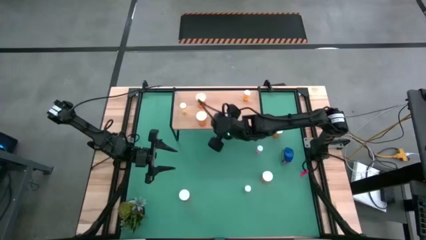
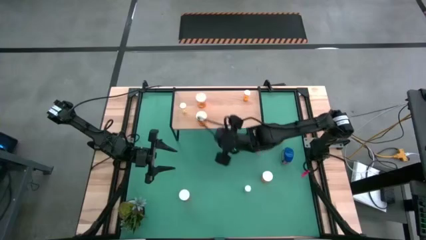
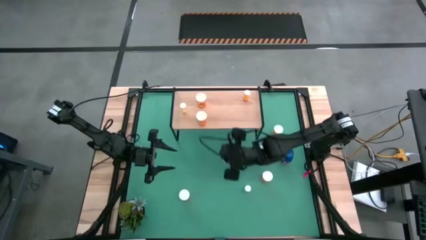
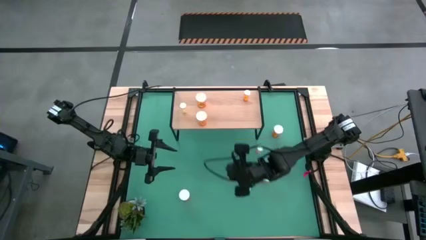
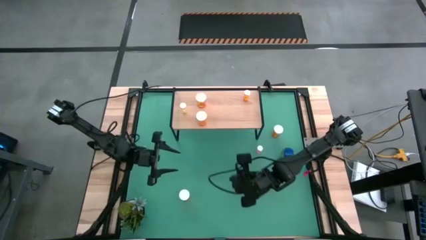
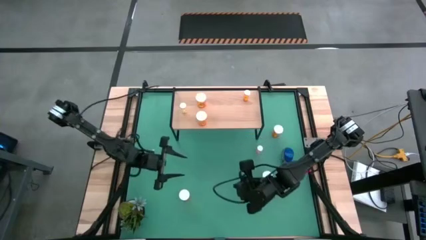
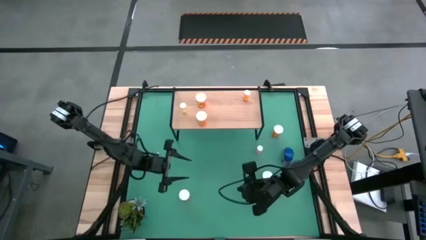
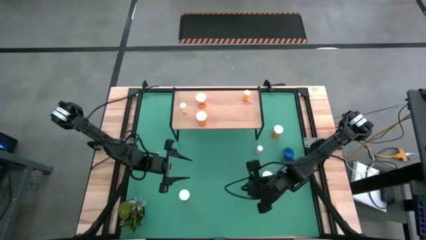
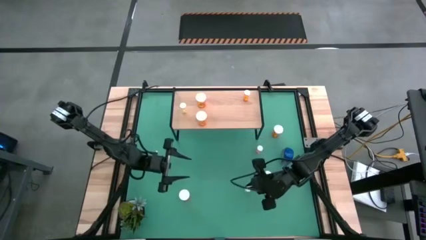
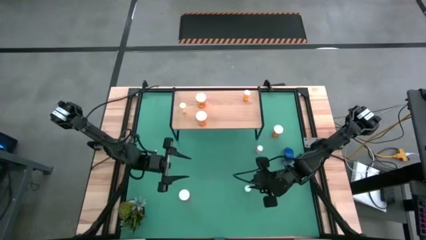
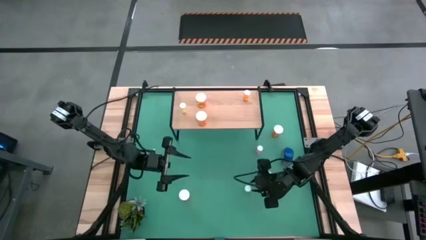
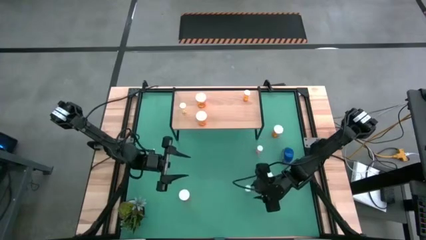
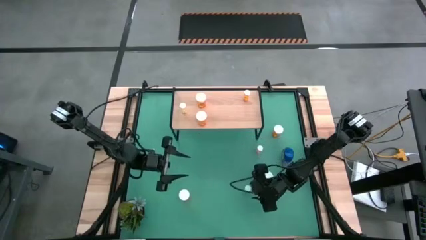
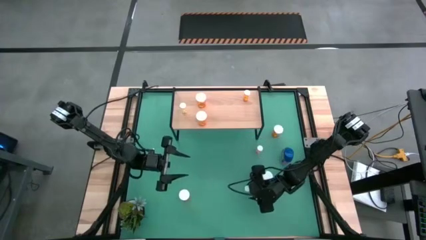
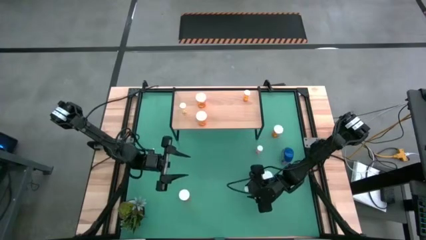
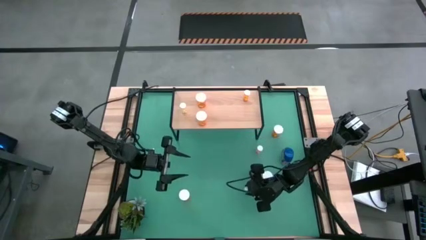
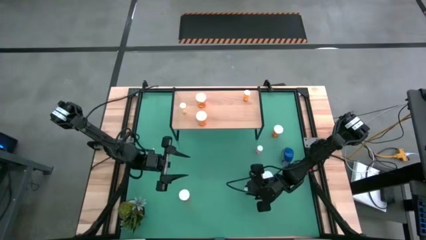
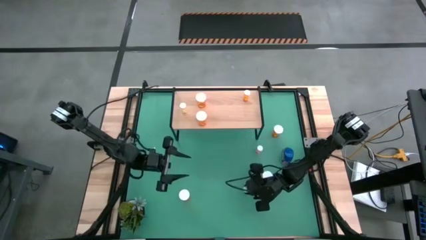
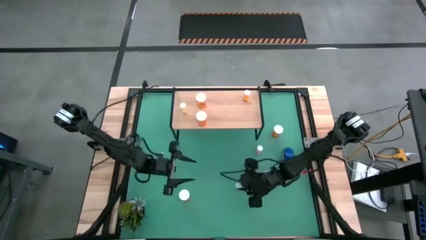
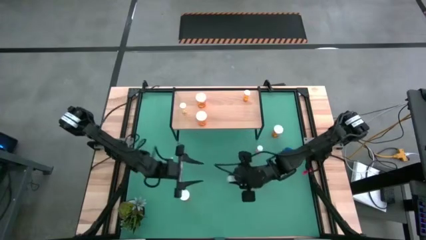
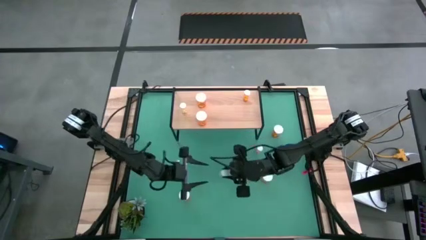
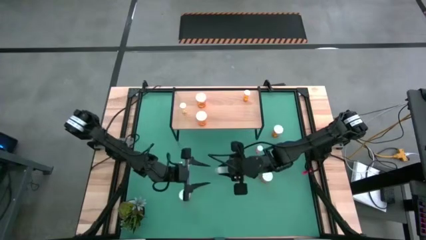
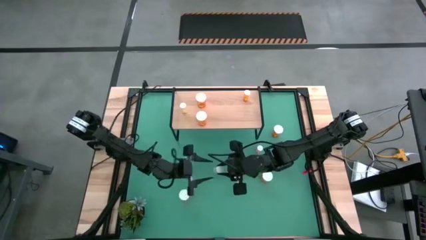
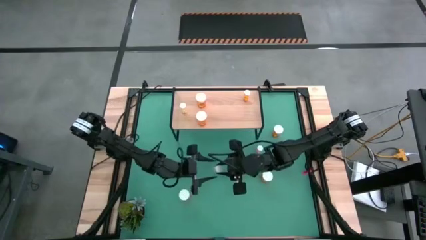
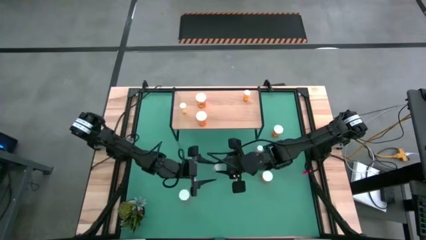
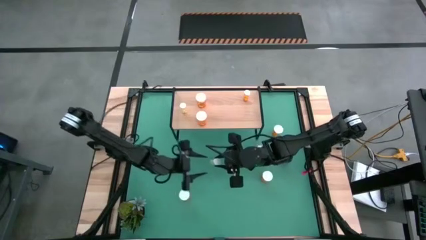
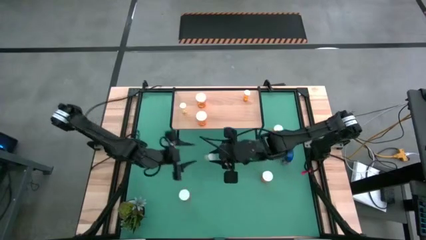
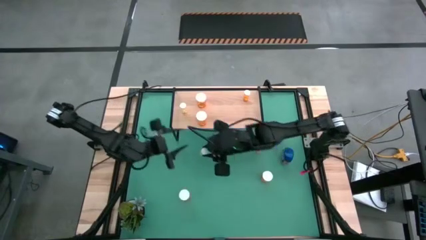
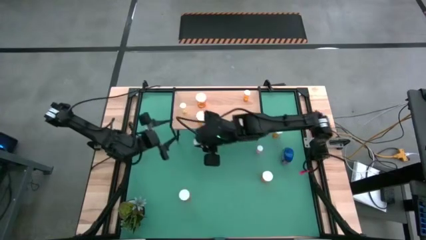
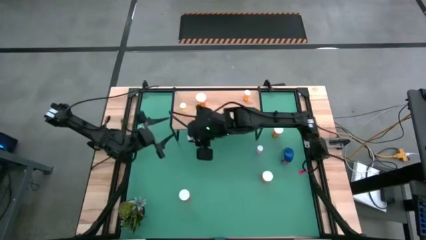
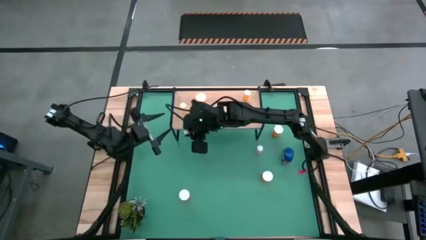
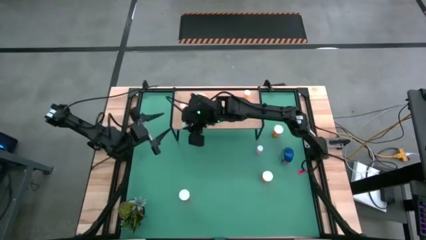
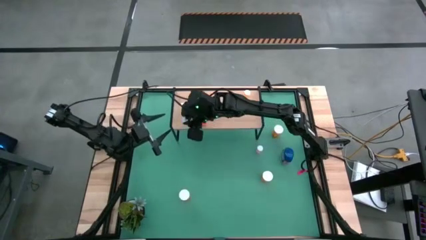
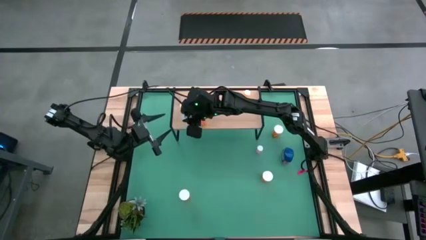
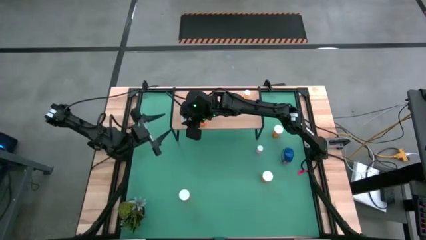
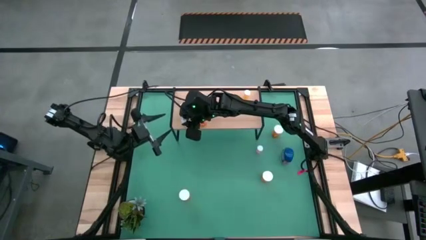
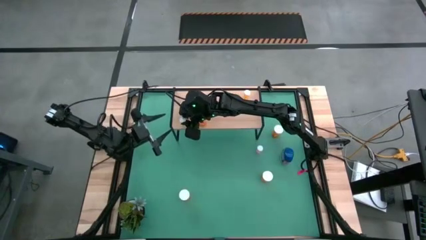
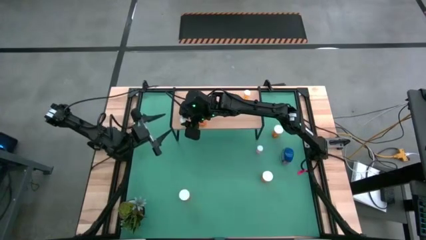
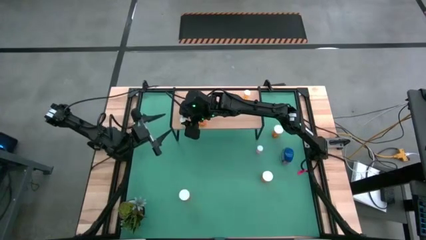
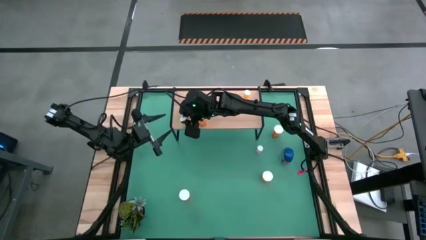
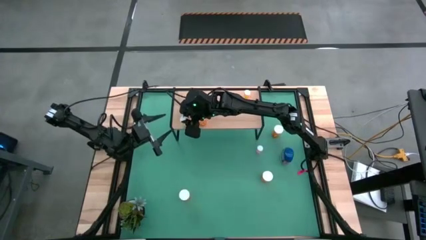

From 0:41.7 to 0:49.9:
Task: Pick and place medicine bottles onto shelf by color
Put the small green pill bottle on the shelf

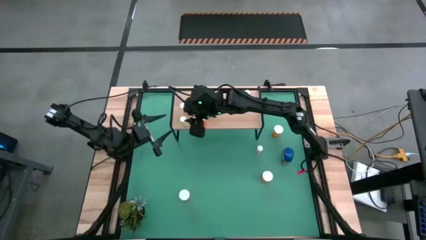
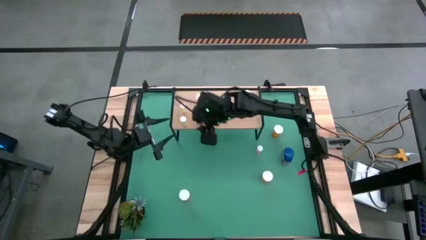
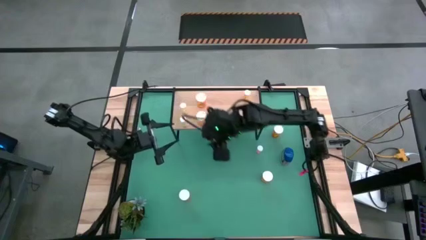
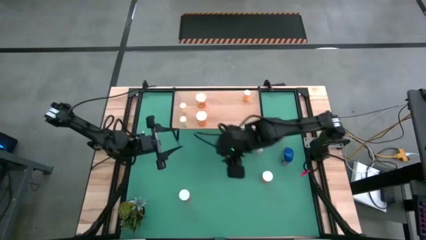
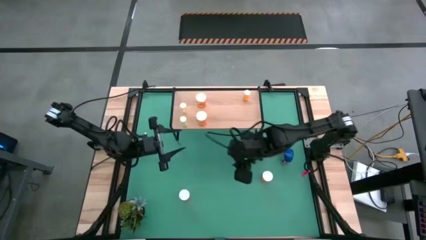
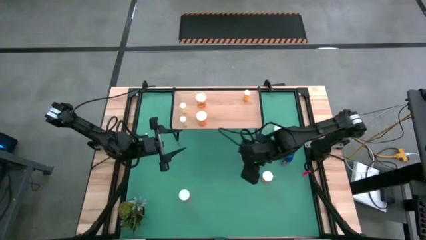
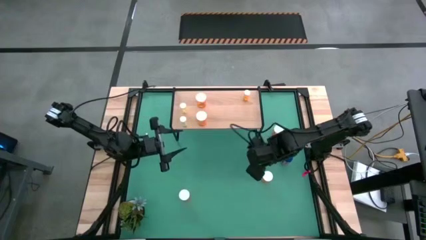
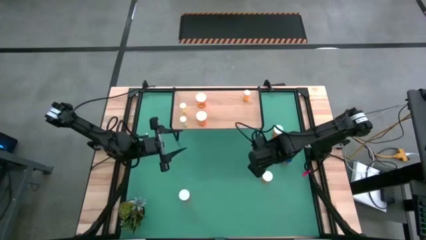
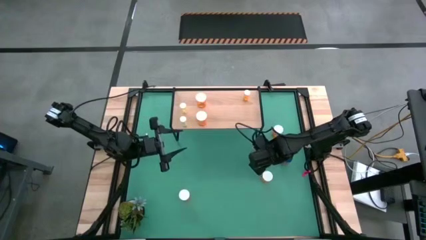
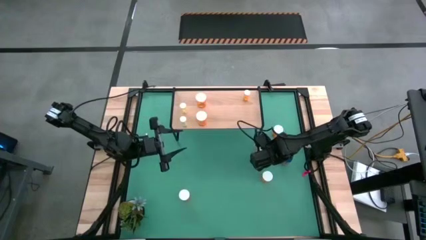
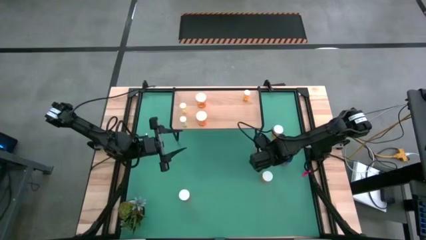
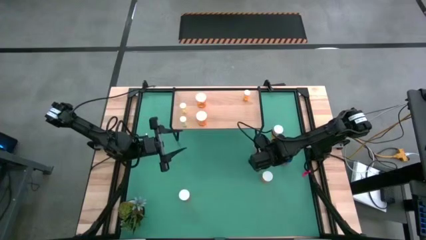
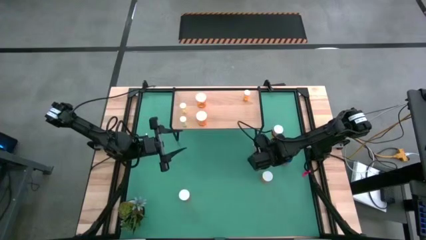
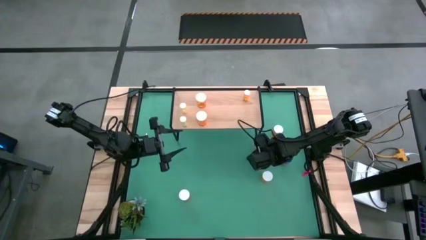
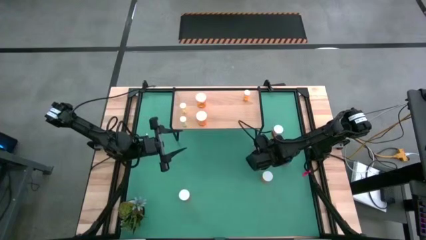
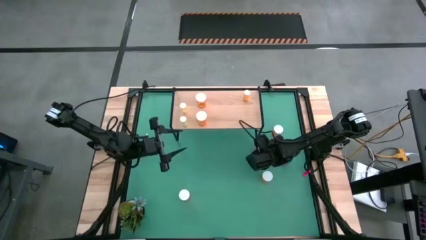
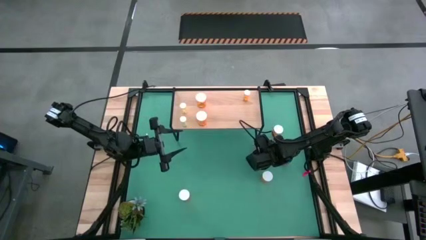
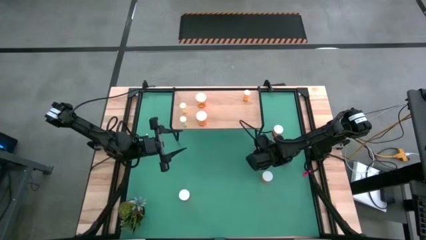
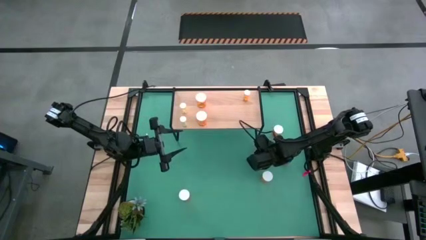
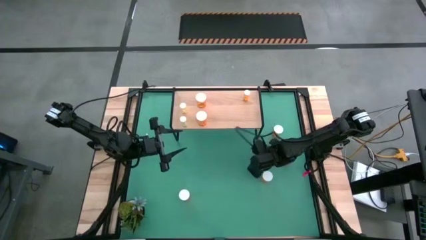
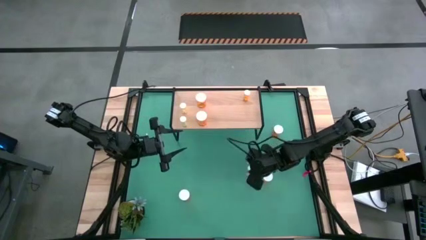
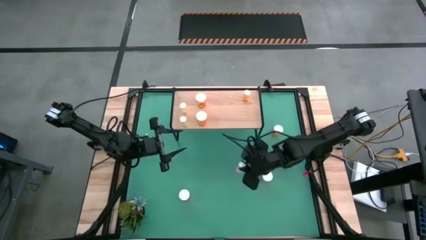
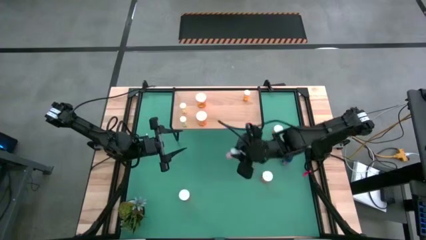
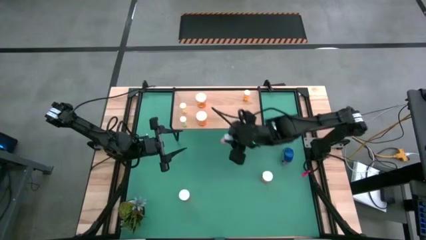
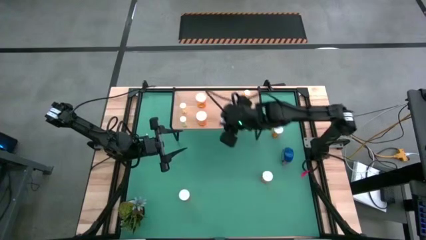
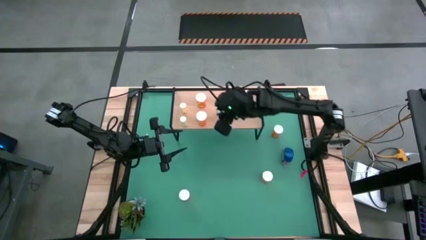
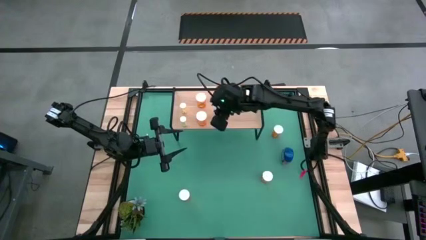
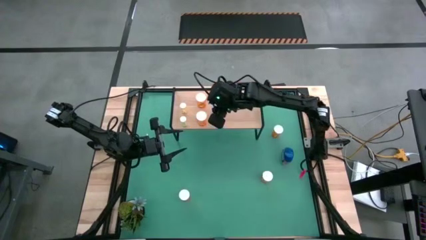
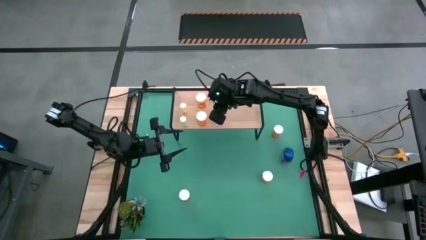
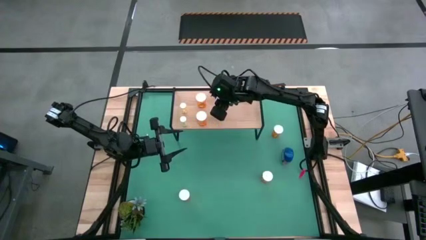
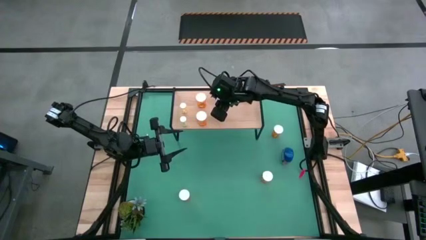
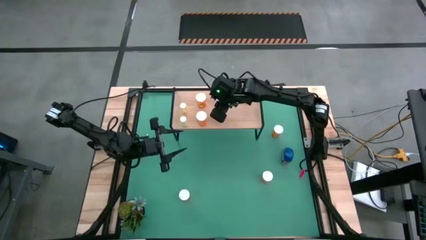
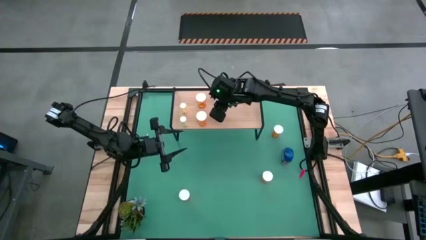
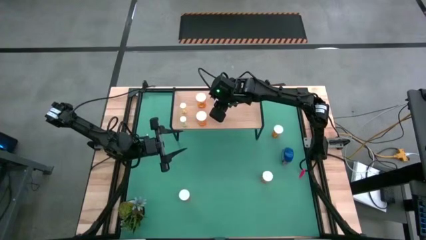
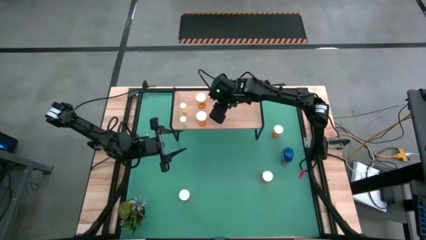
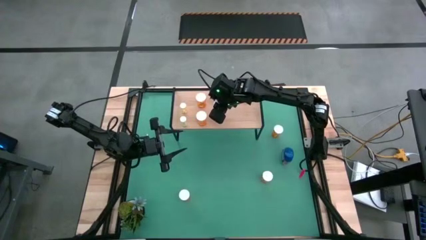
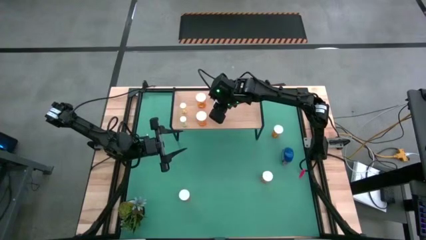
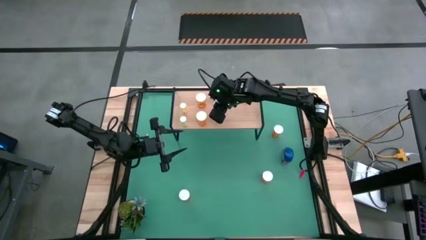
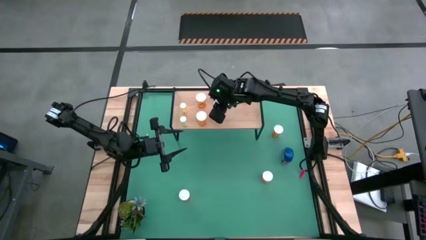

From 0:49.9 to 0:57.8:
Put the small pink pill bottle on the shelf
